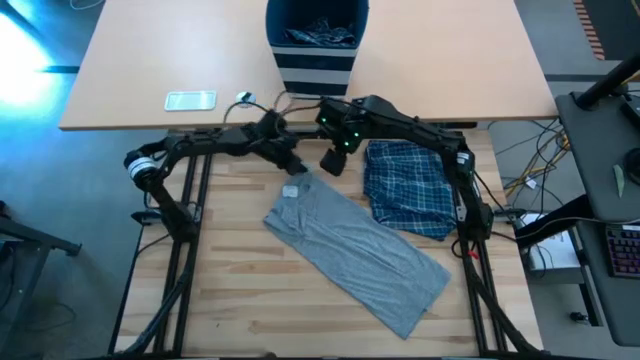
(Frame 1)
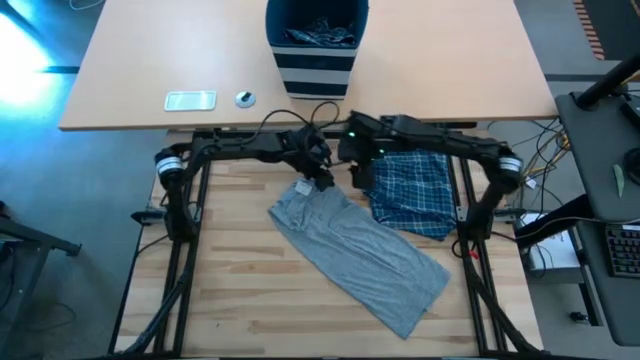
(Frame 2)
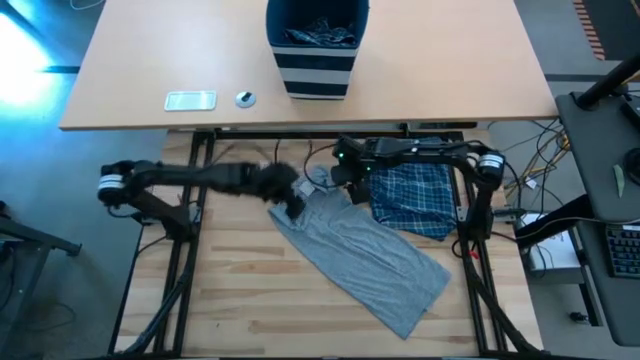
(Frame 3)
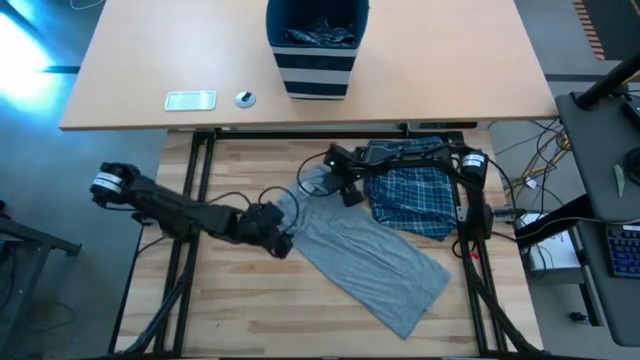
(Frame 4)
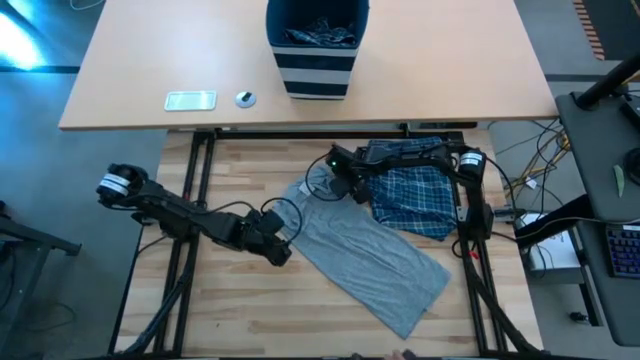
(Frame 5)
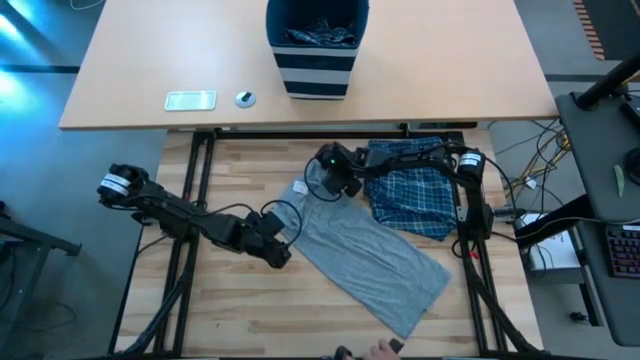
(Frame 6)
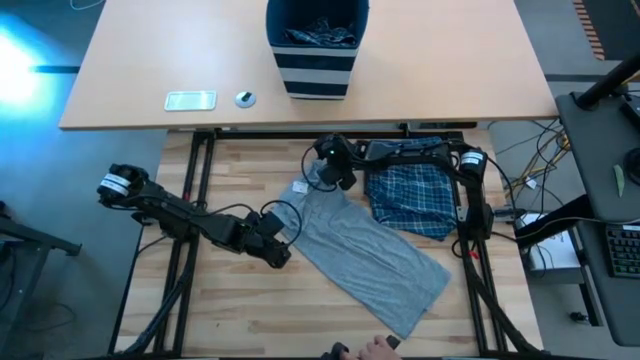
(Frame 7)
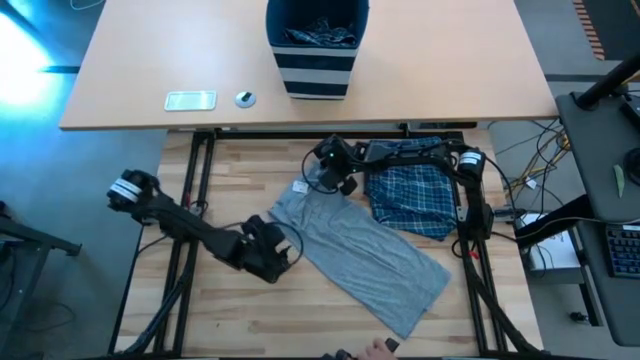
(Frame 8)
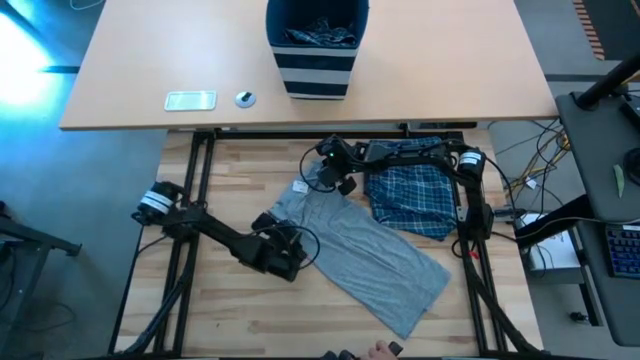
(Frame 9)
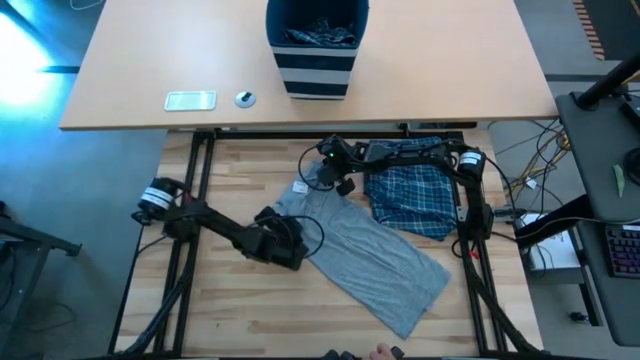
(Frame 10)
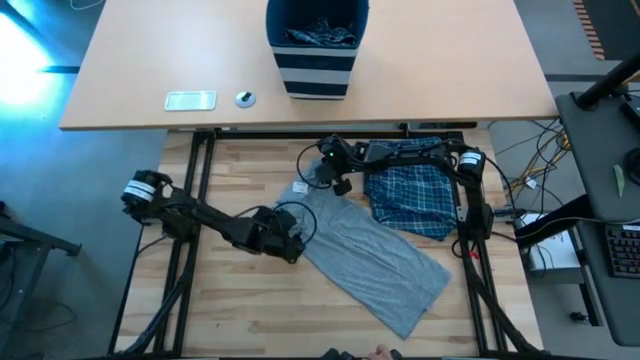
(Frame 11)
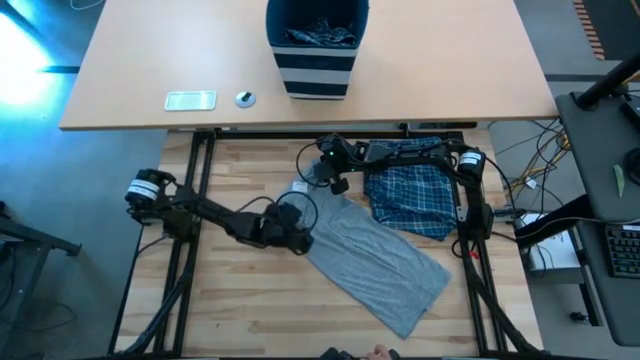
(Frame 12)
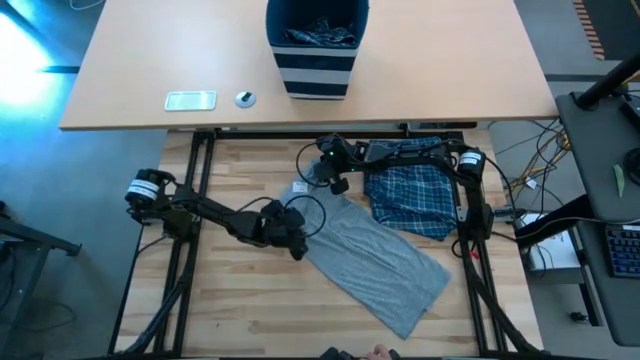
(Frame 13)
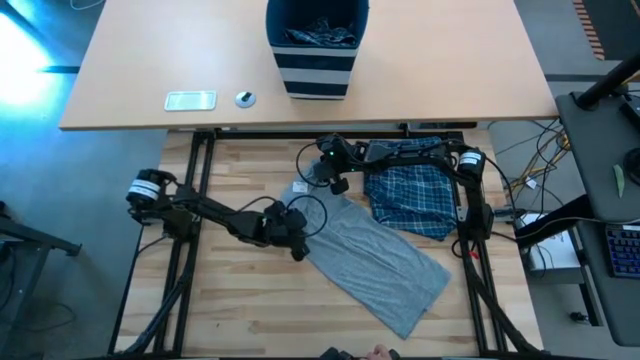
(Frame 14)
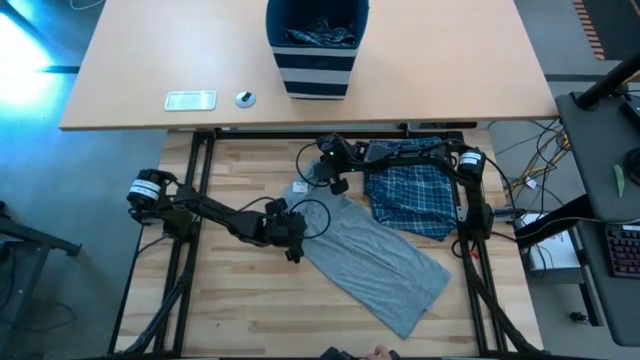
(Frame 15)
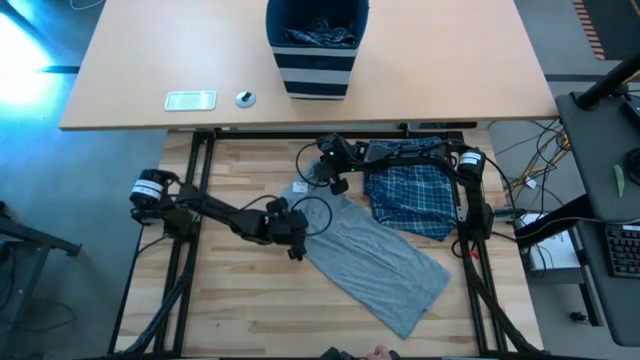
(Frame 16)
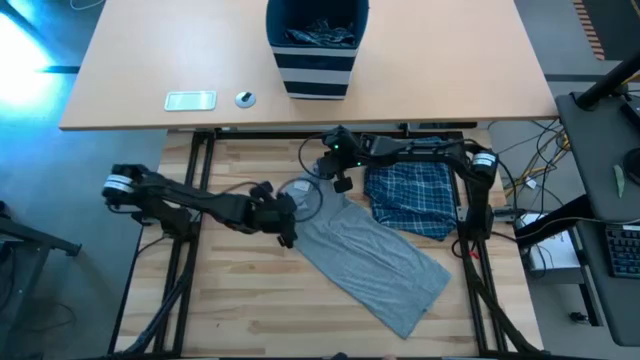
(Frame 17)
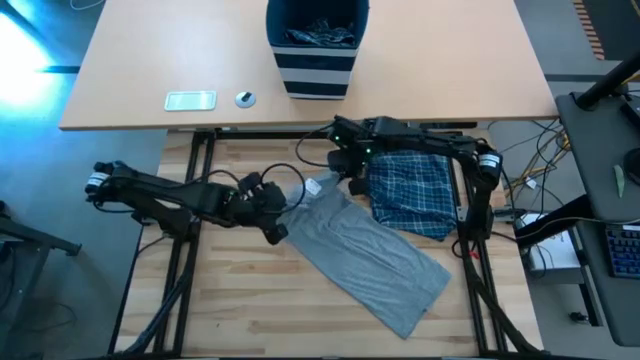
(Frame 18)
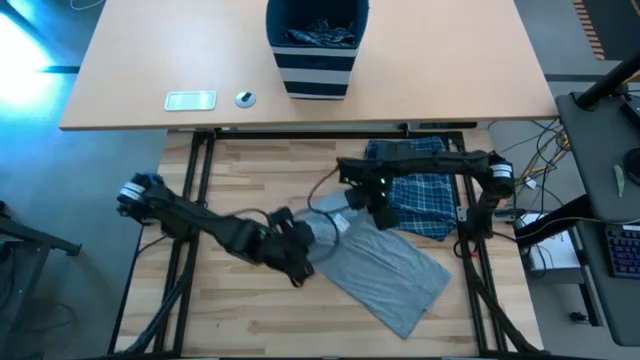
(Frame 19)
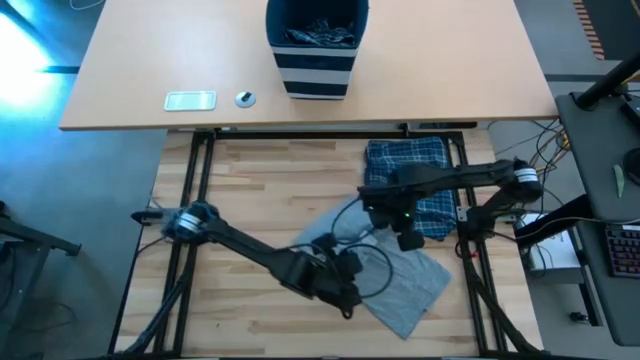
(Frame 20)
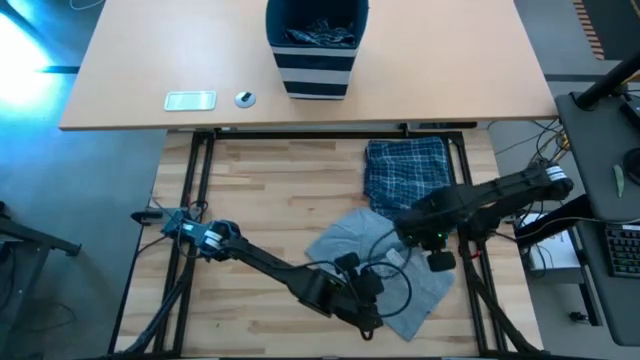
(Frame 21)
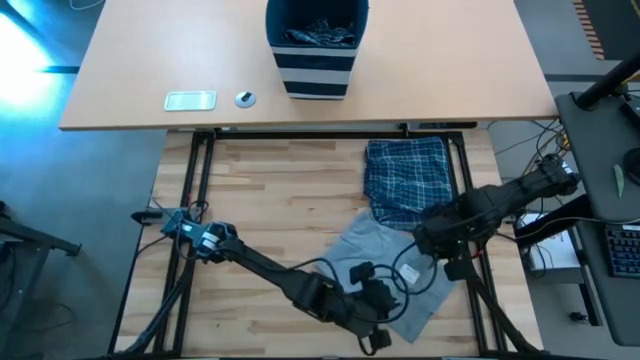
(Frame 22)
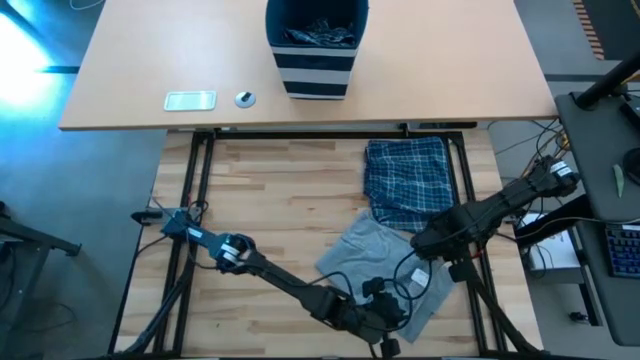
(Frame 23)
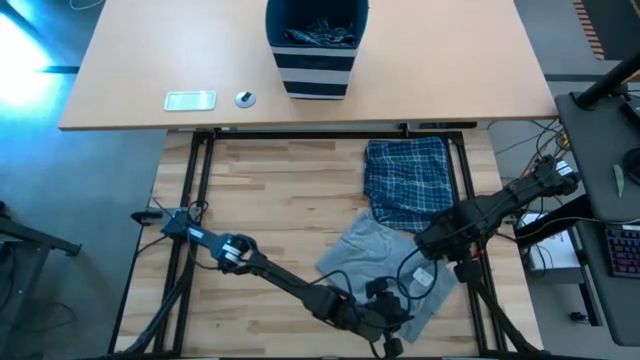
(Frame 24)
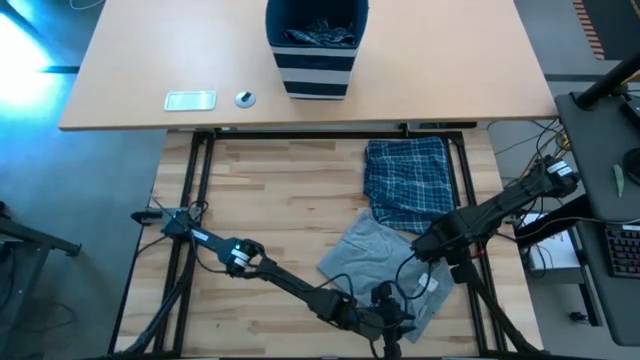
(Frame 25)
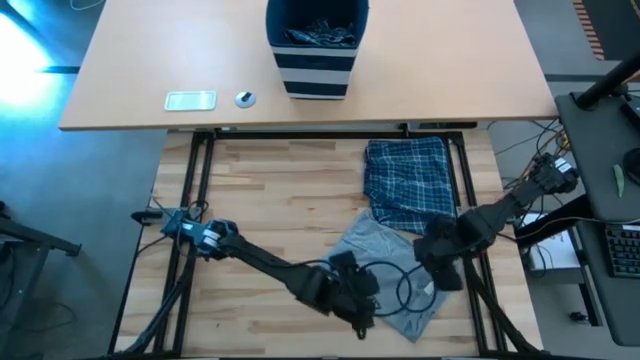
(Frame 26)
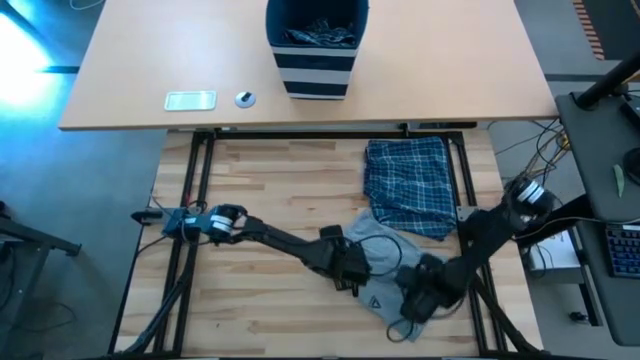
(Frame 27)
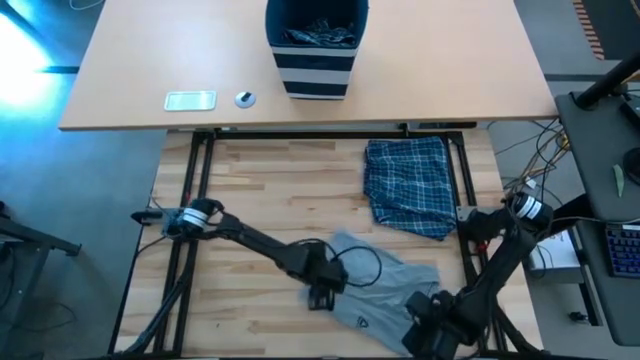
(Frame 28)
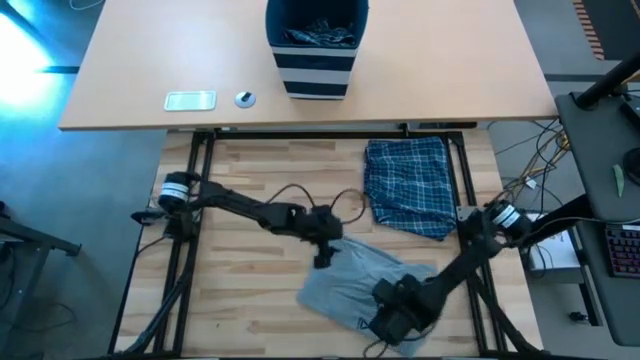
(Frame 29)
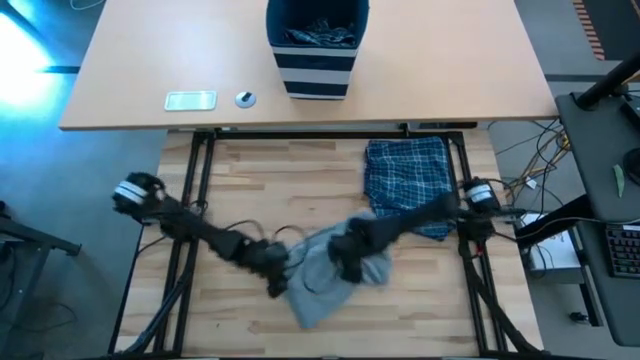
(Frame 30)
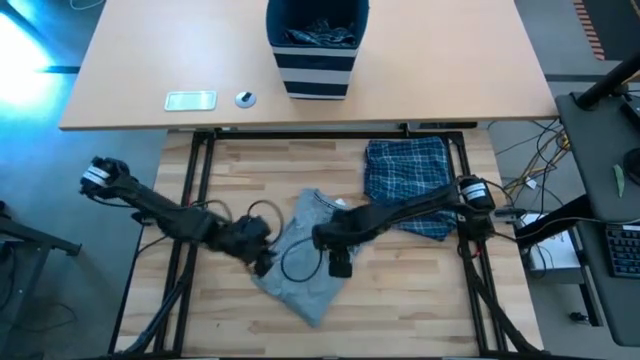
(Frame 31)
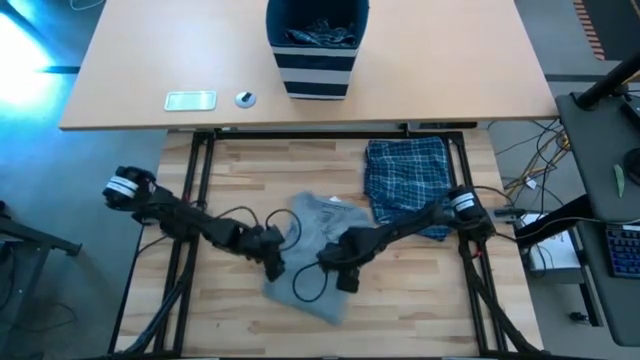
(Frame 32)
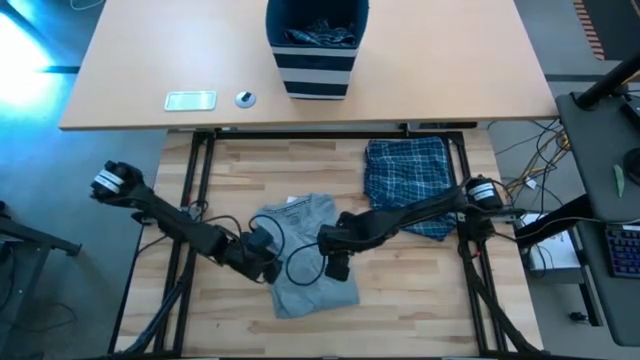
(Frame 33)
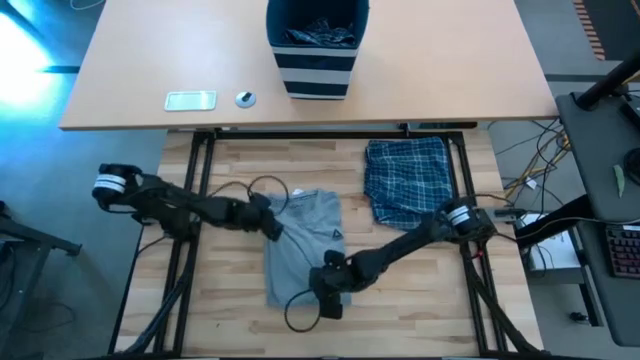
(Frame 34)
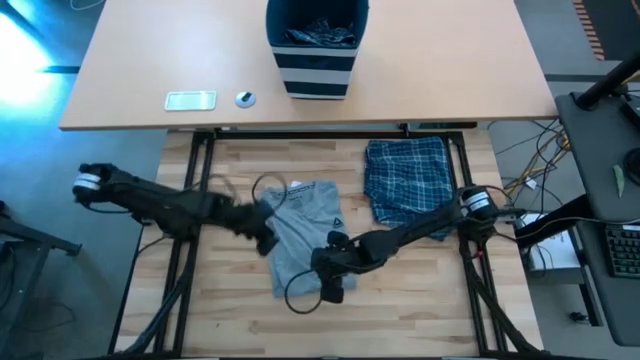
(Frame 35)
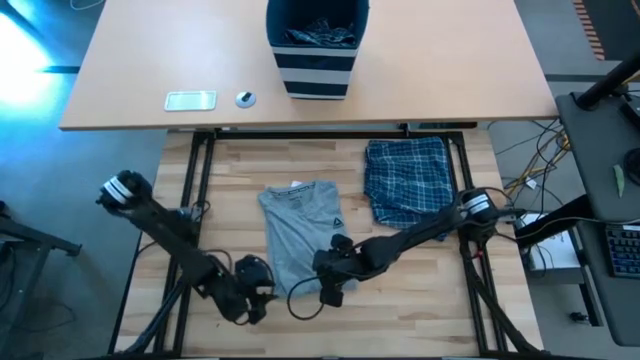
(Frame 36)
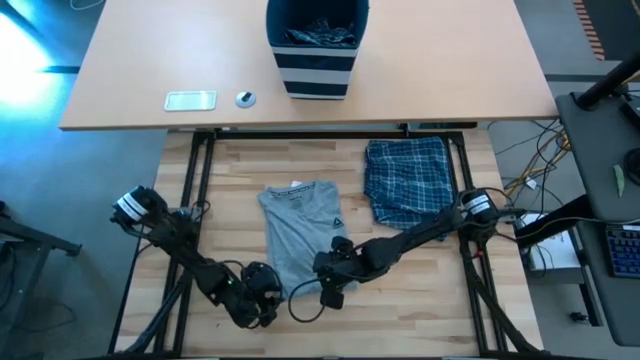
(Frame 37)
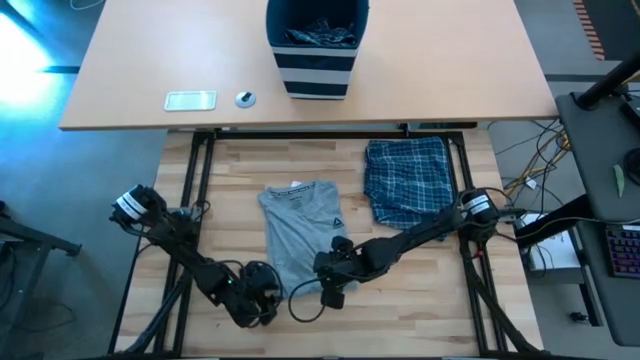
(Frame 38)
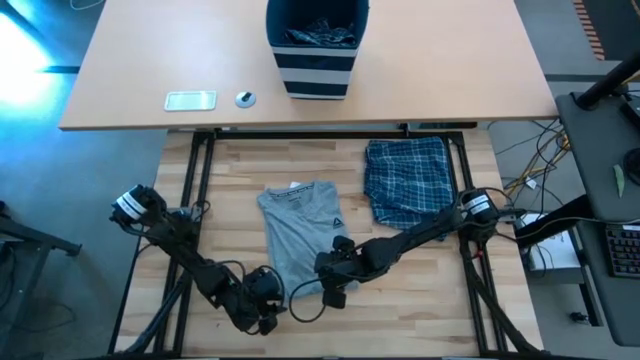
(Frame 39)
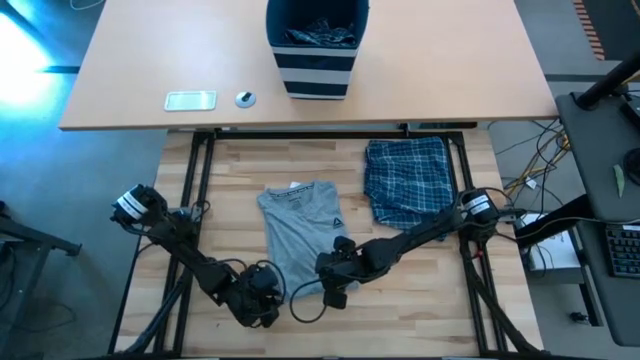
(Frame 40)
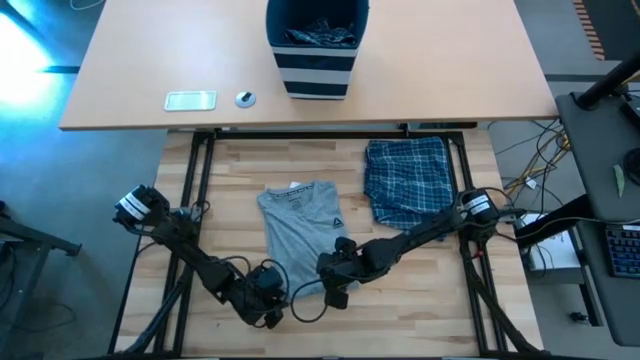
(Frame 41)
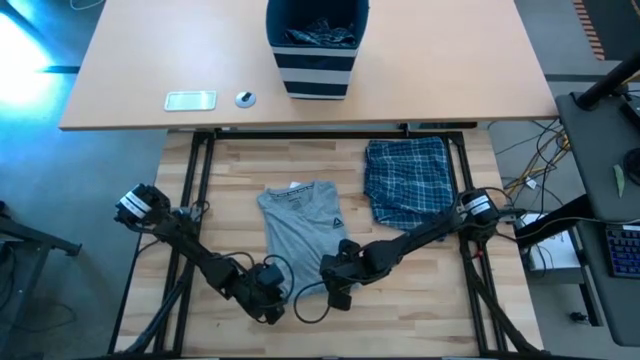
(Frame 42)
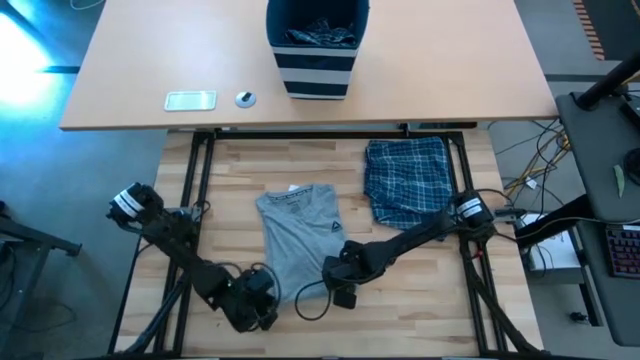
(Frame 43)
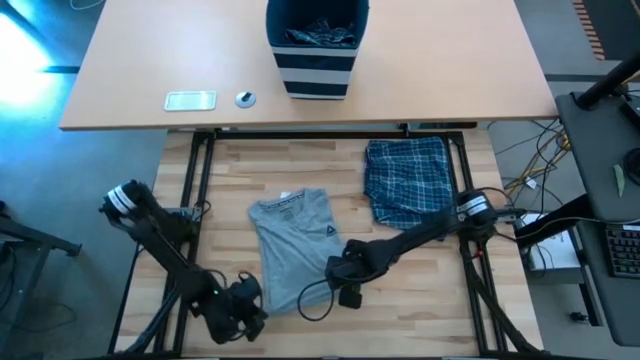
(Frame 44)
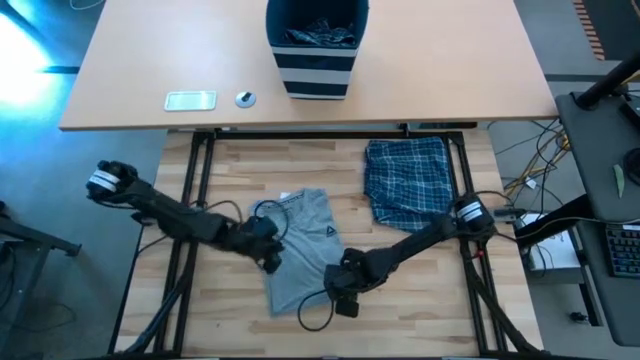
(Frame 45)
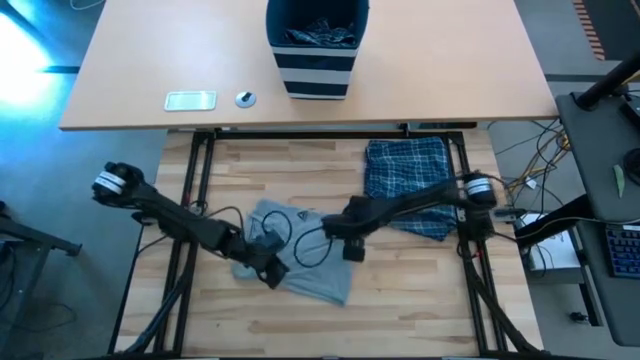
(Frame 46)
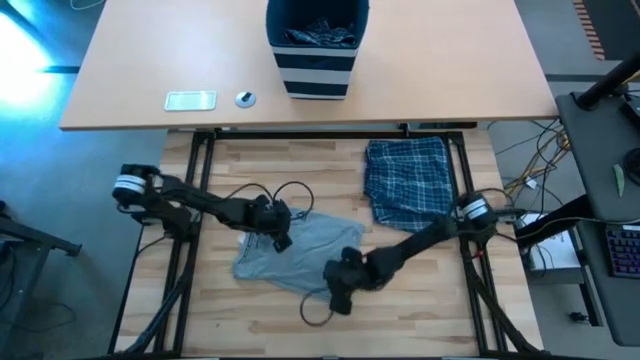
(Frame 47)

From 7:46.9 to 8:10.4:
Task: Fold Laundry from Bin
Fold the gray shirt
